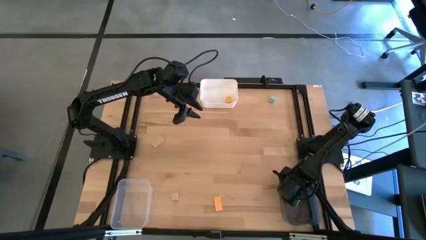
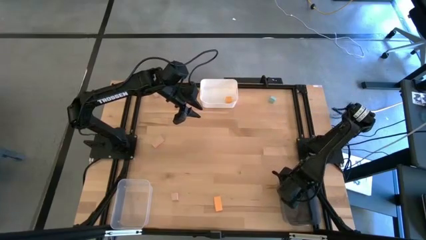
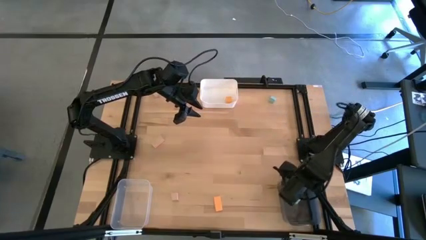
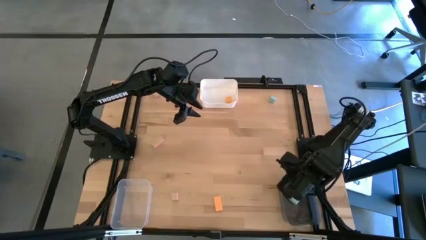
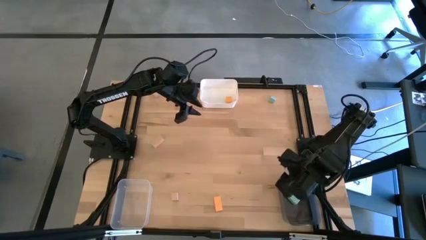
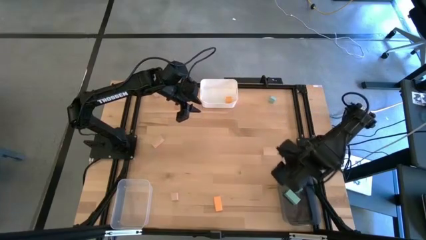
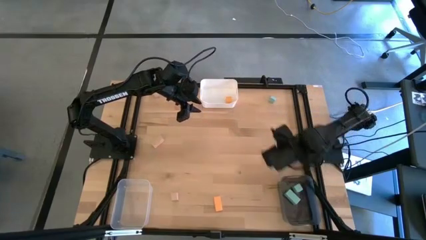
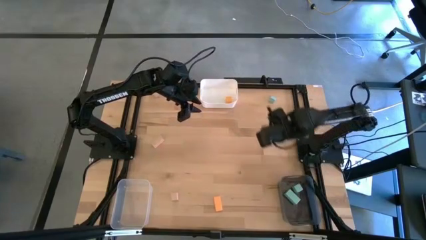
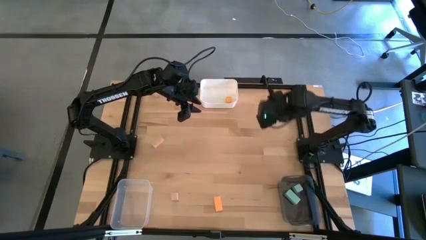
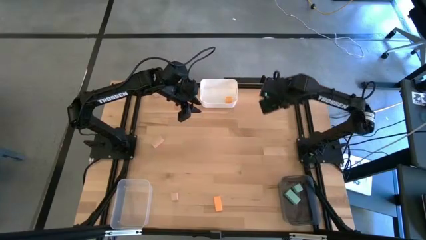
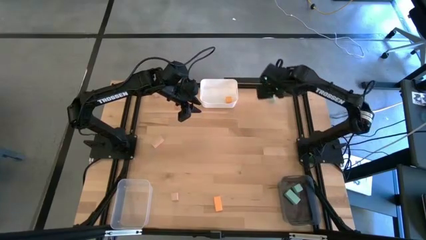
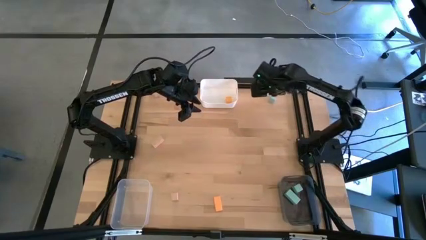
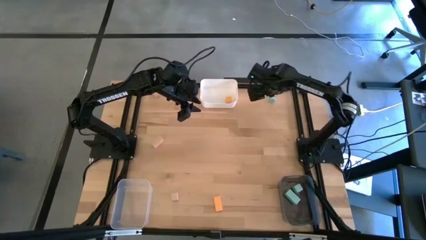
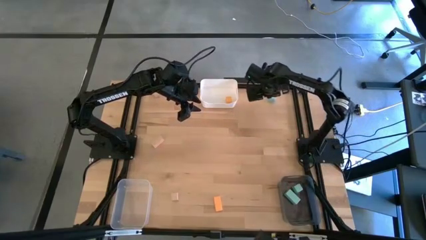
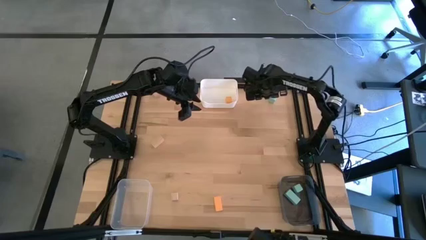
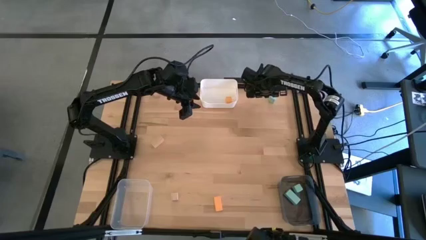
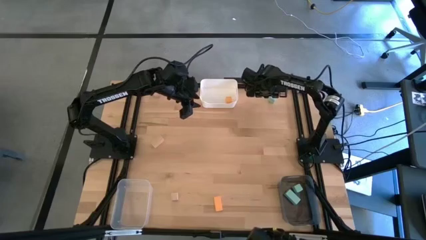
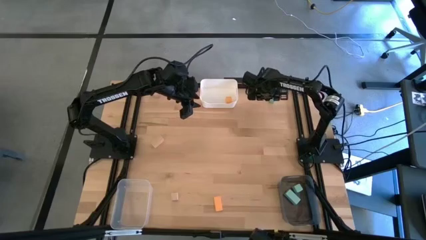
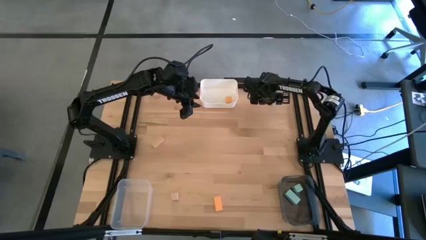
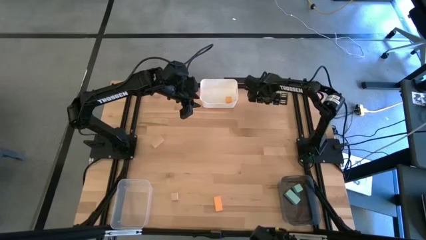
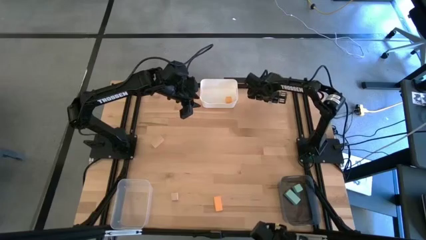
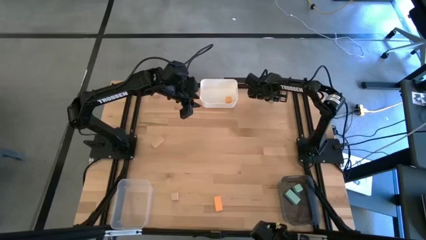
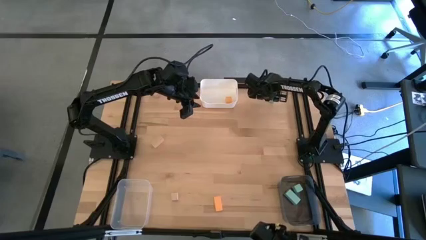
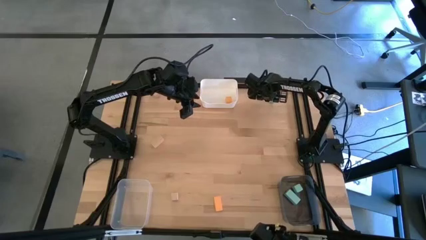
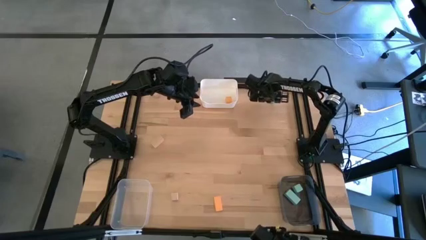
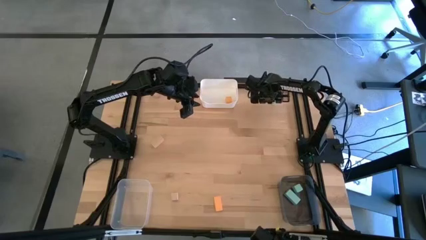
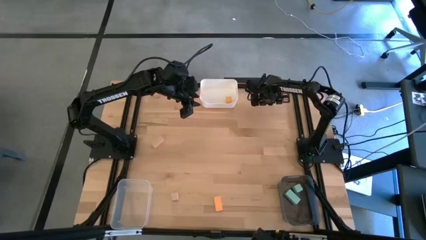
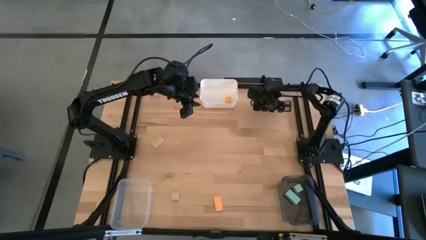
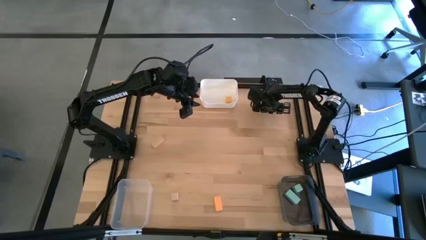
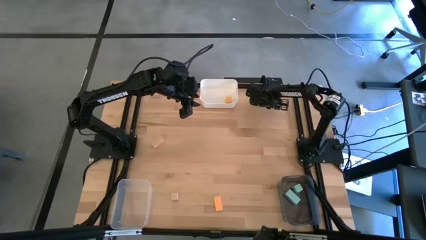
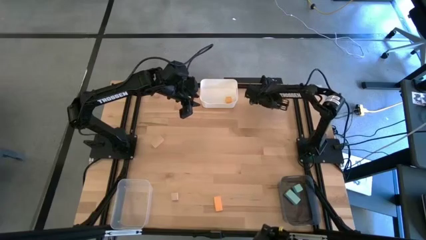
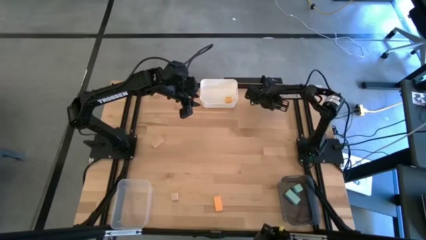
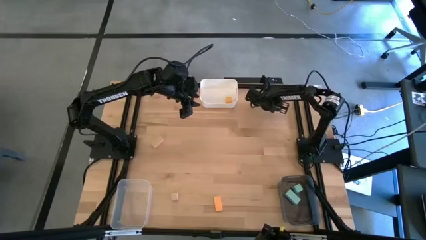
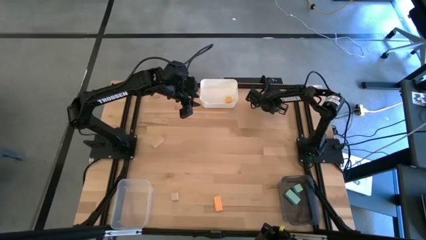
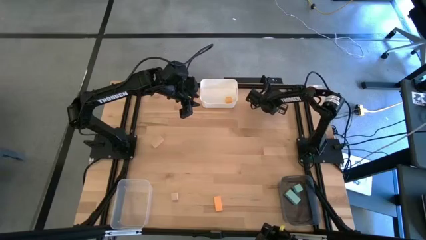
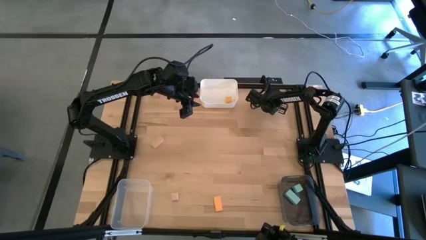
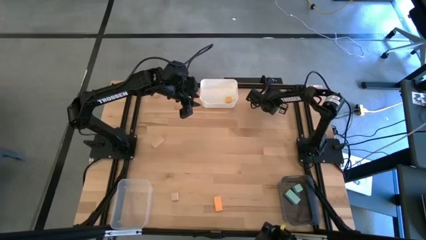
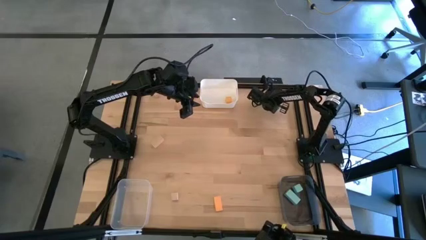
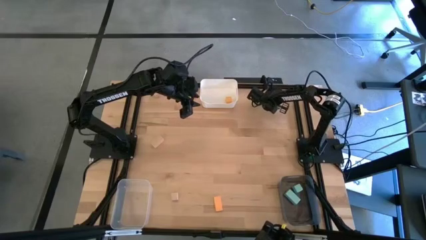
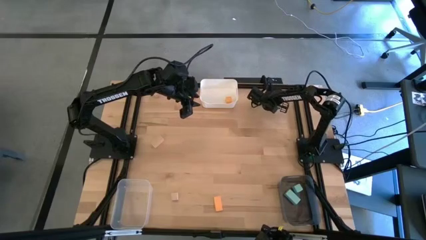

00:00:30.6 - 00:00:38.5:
Task: Sort & place blocks by color
Put the light blue block into the black bin

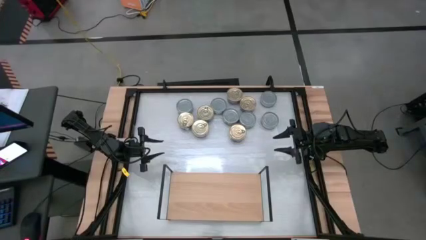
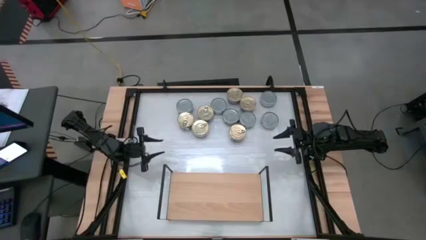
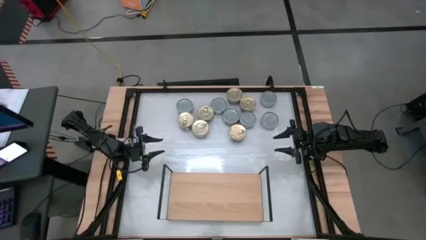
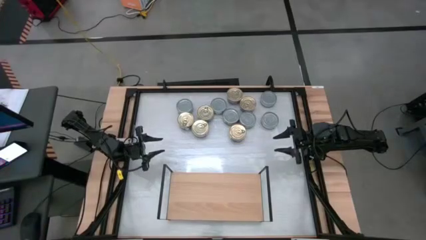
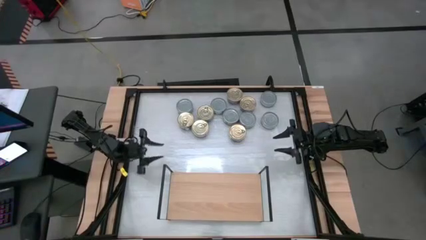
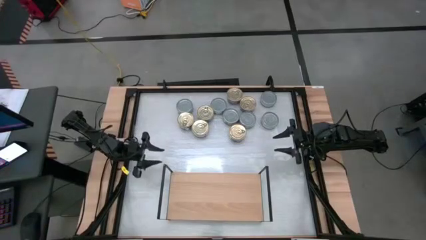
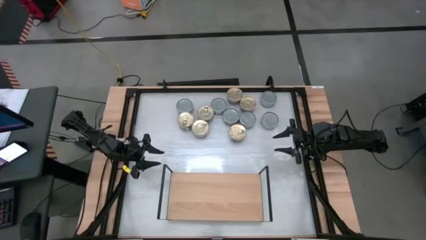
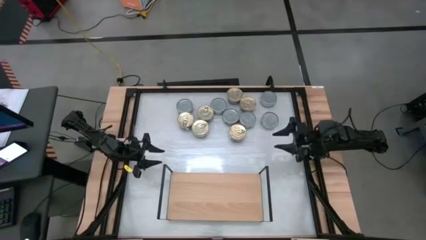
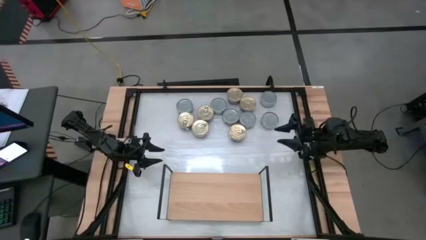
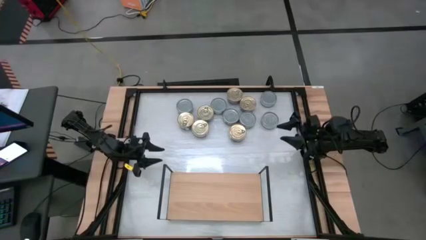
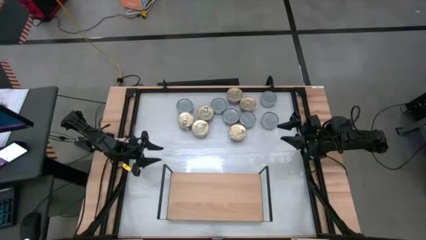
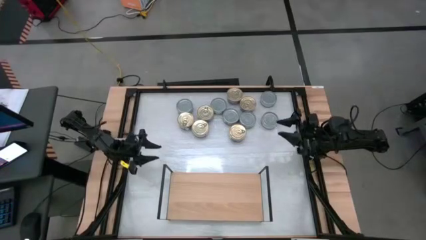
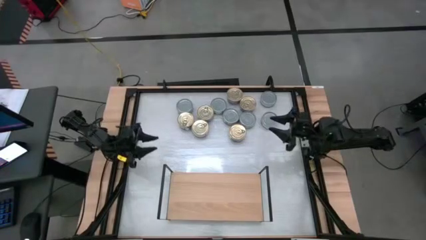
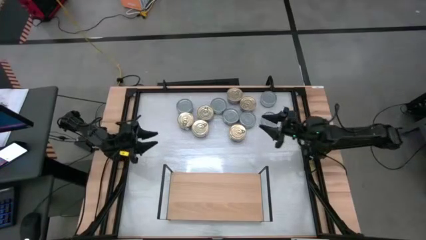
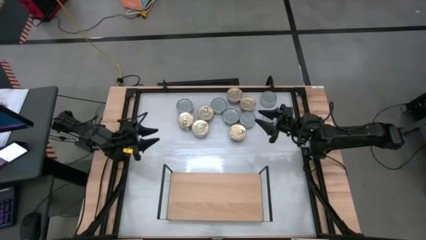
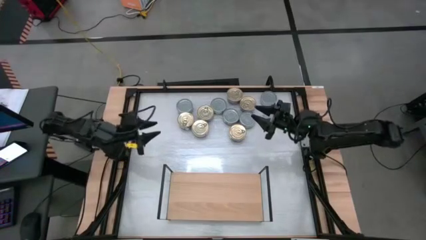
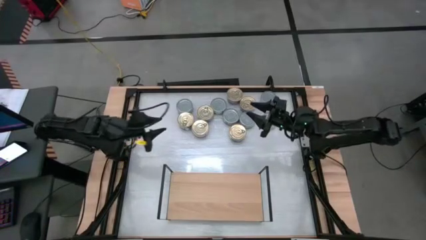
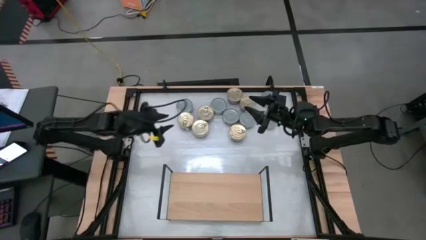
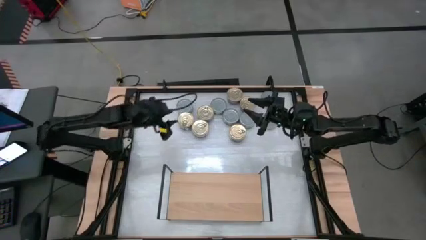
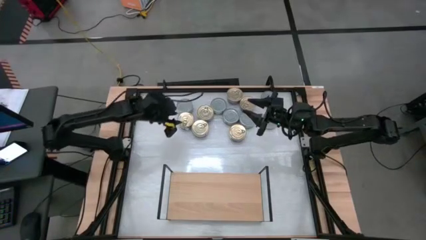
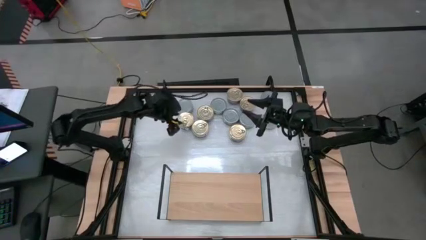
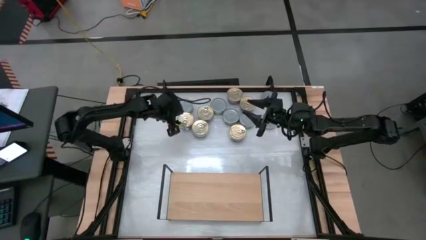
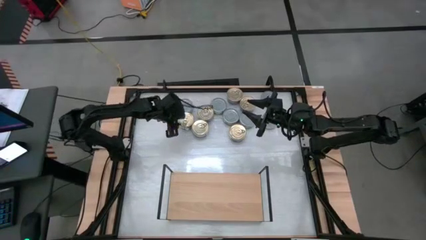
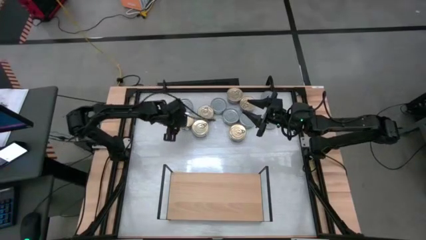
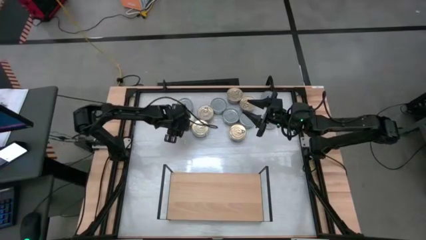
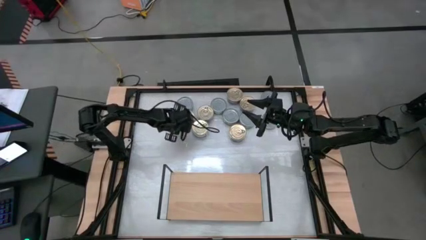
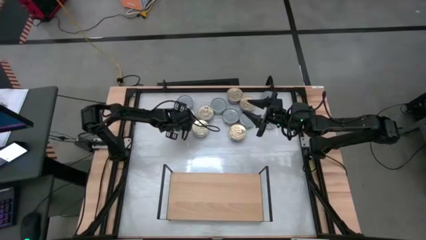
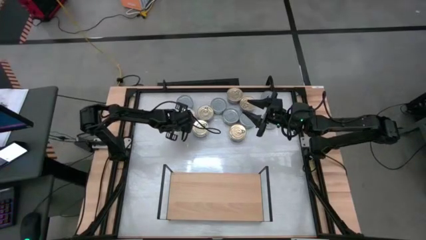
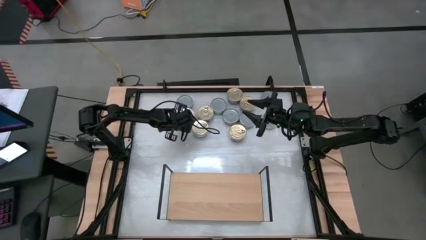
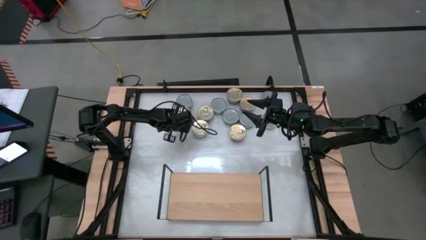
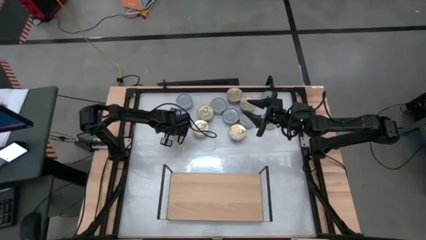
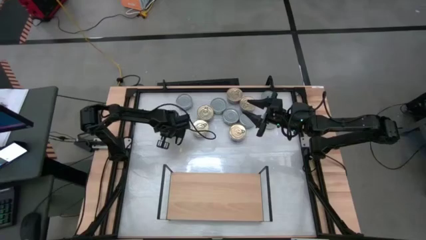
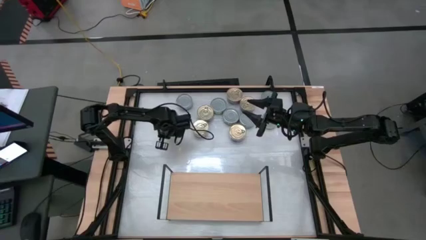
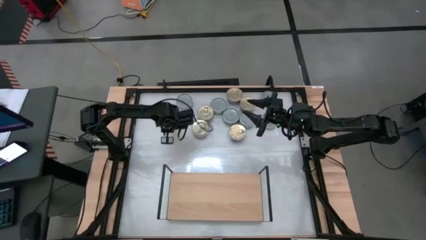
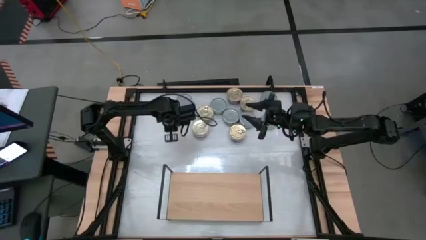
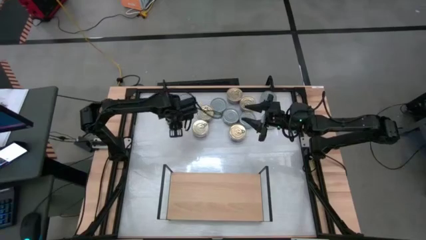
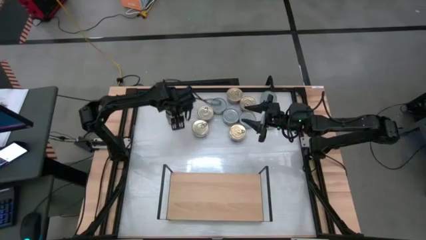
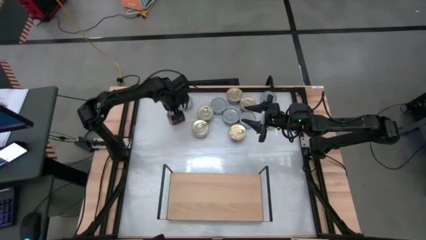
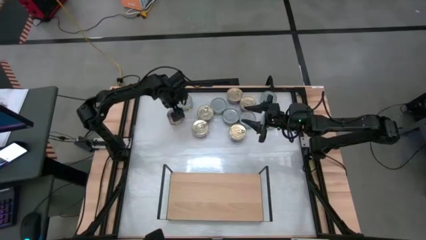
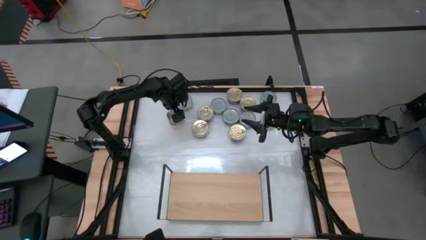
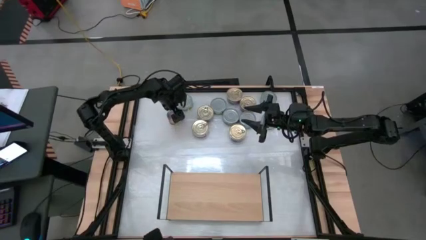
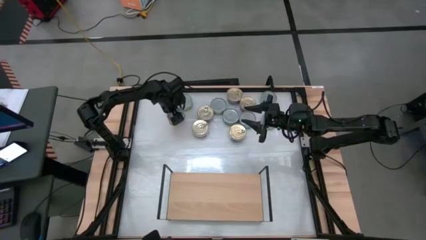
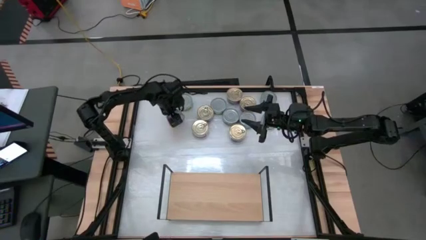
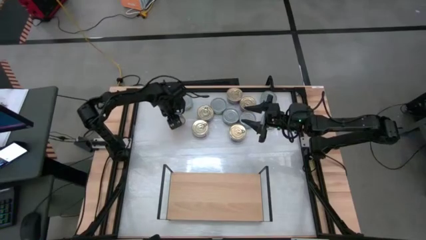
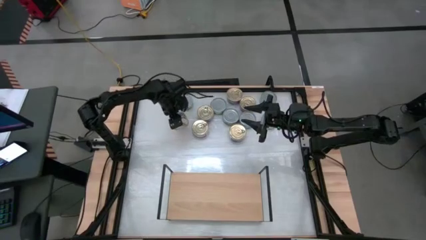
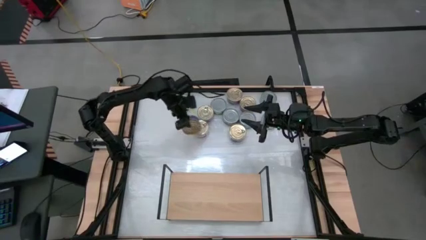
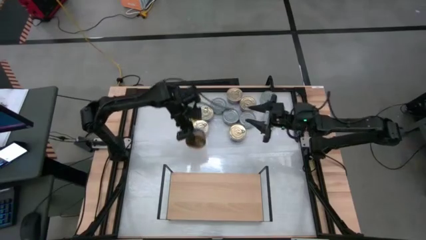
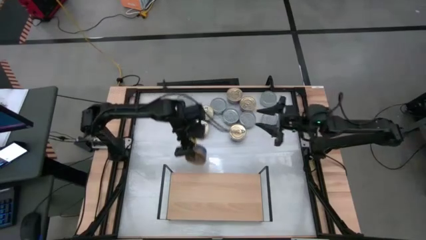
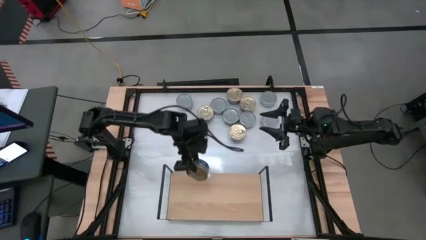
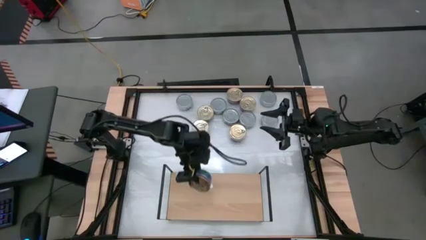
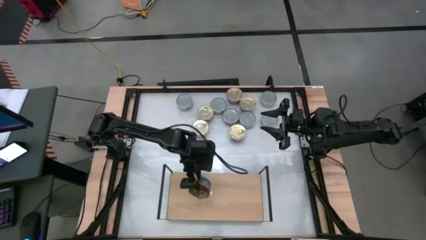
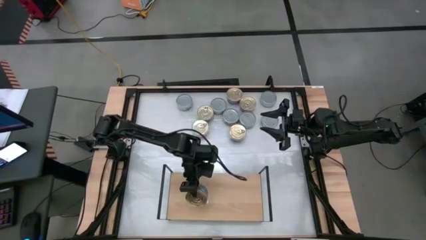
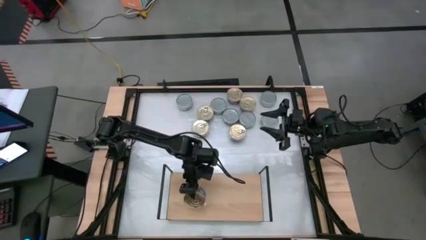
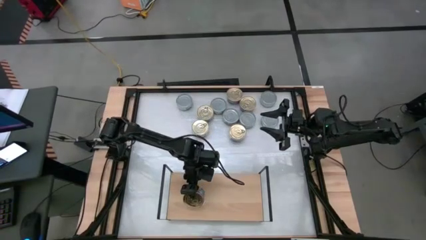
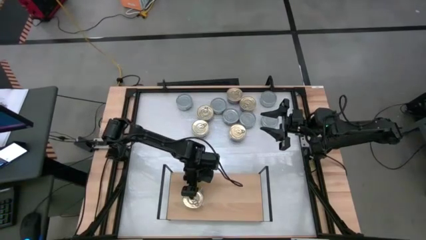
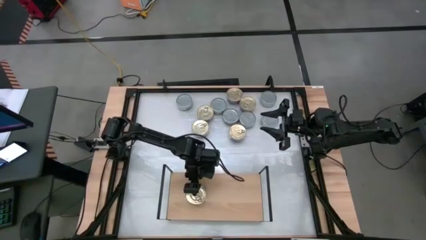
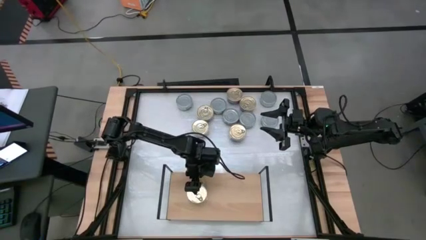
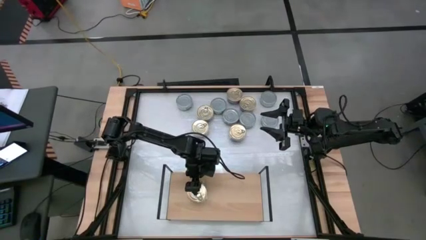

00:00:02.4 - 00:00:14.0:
Task: Stack canned seafood by type on shelf
Put the blue tuna can on the shelf
